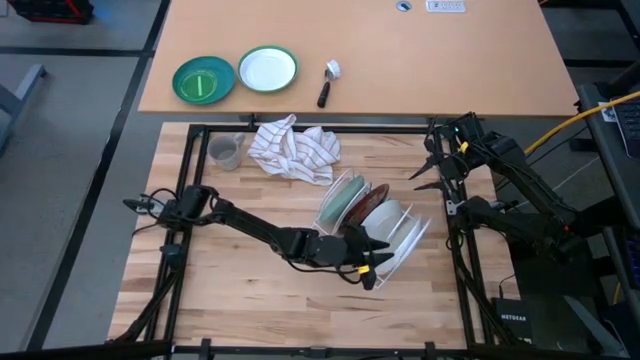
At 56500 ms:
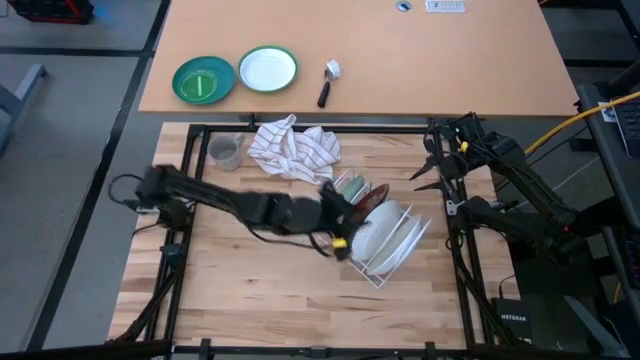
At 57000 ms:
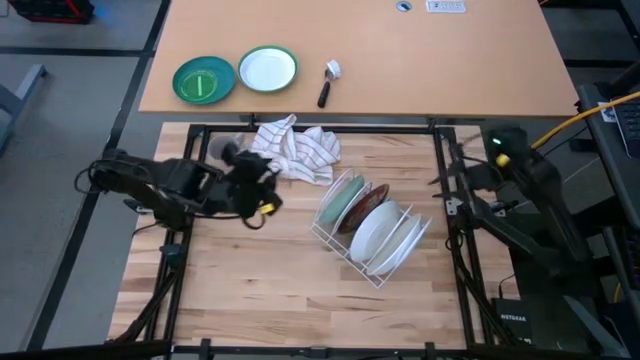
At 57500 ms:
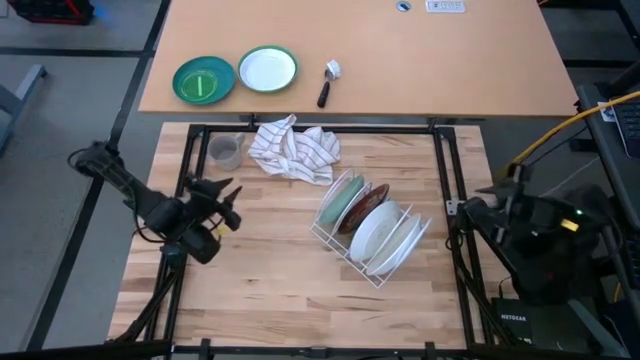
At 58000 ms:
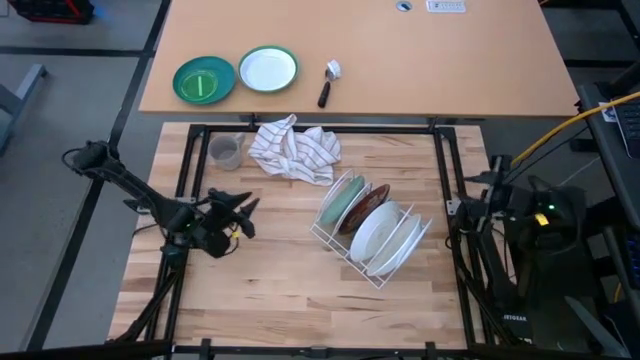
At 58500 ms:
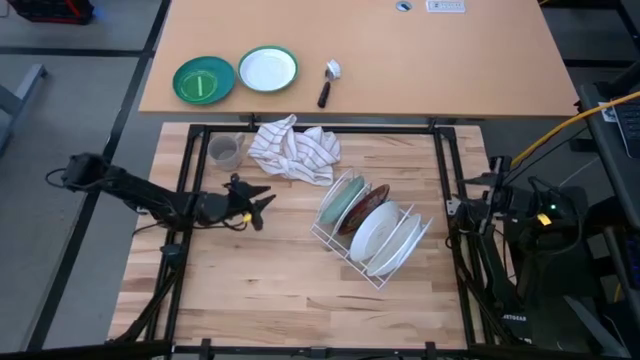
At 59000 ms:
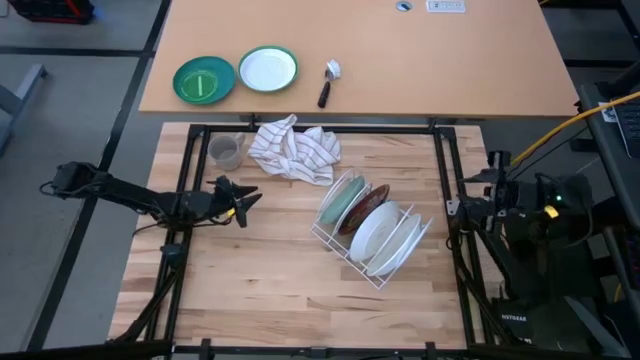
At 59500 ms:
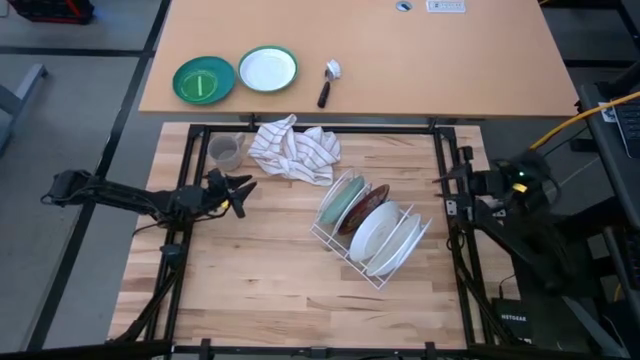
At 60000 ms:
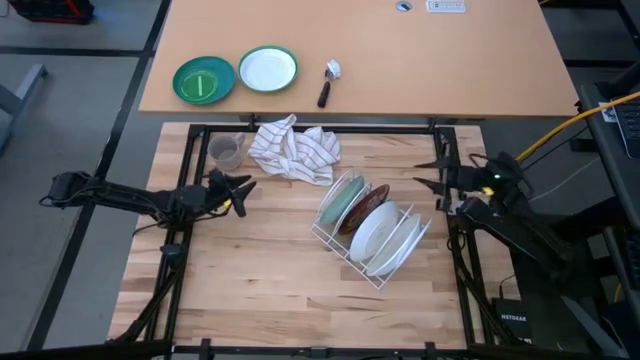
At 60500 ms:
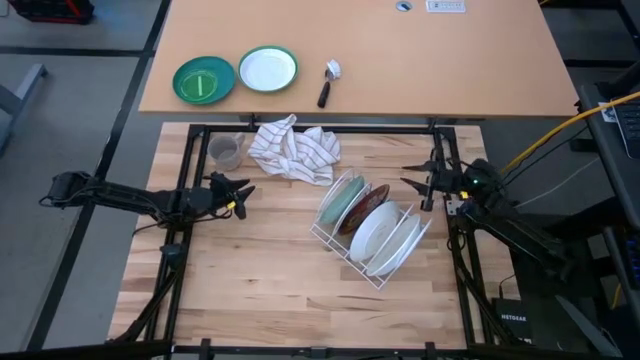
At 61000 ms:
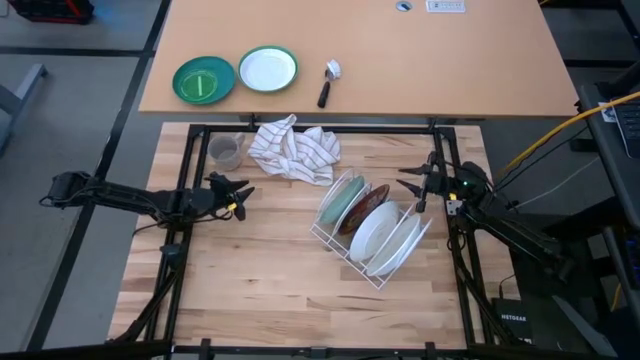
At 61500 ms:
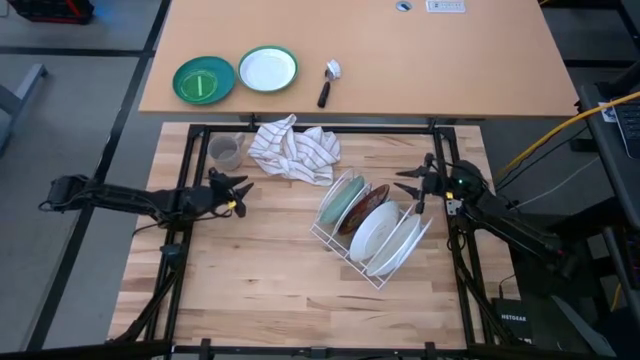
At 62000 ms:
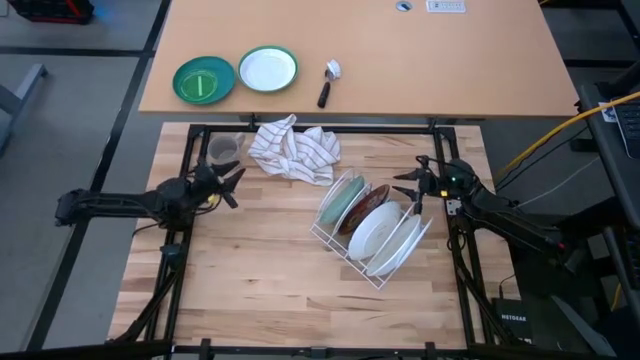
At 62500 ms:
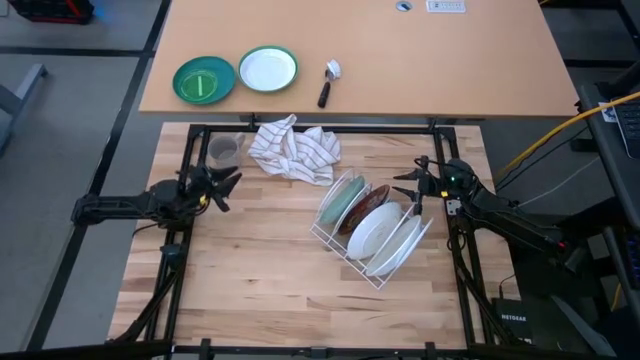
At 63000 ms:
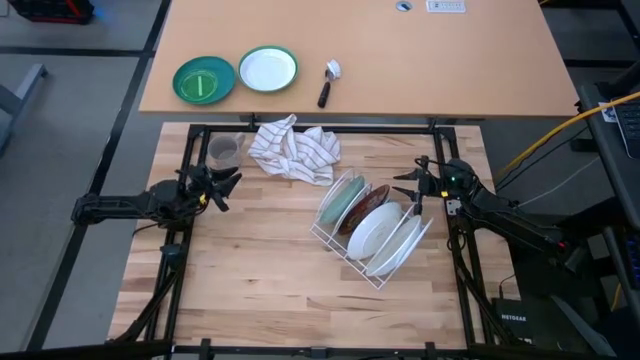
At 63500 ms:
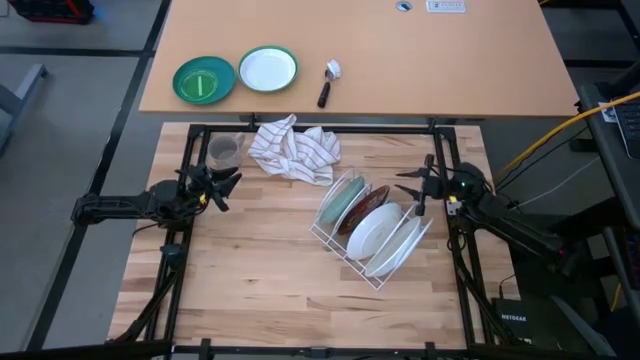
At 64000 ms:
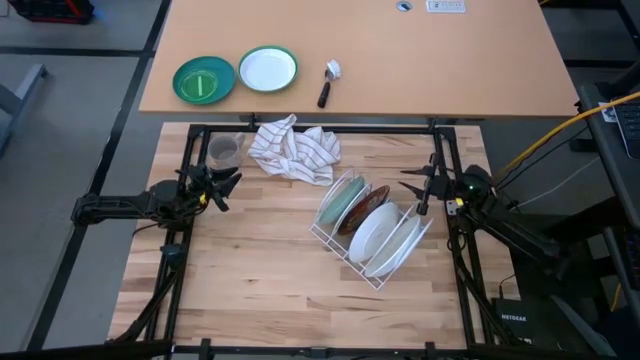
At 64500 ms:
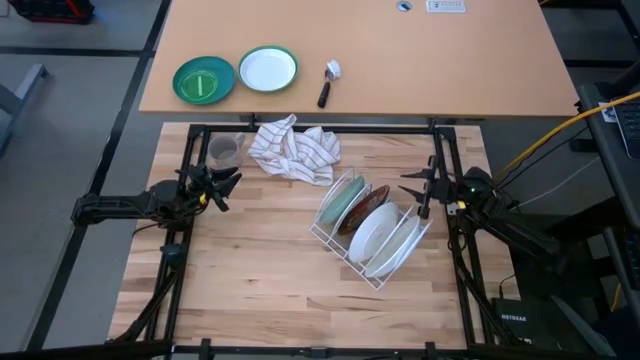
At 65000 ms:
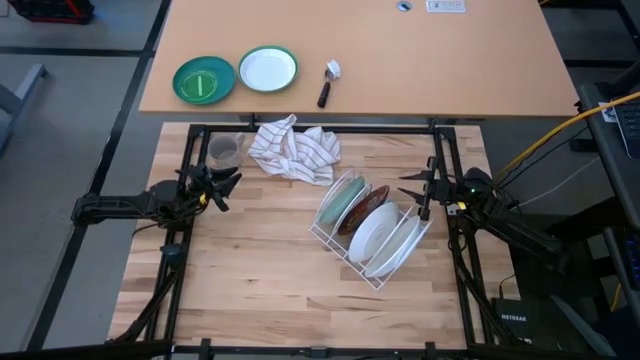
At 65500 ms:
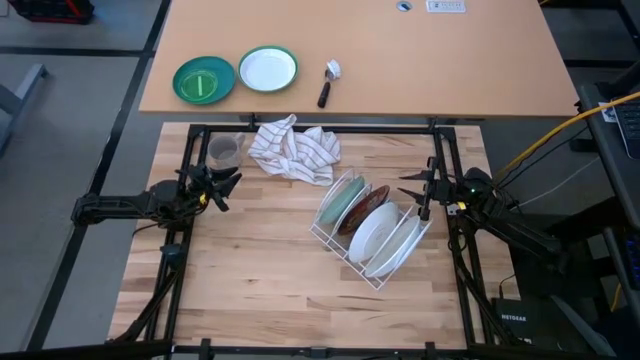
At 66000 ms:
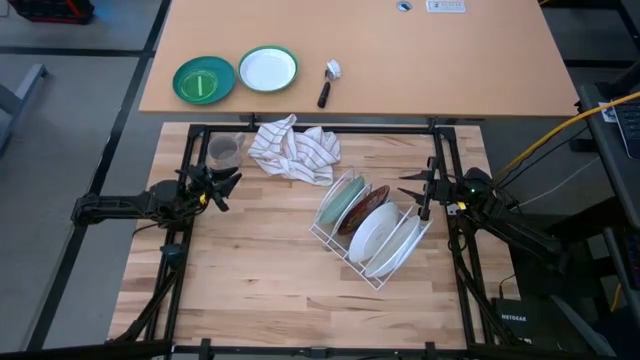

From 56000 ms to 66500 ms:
Task: Sort dishes
Return to Home Position

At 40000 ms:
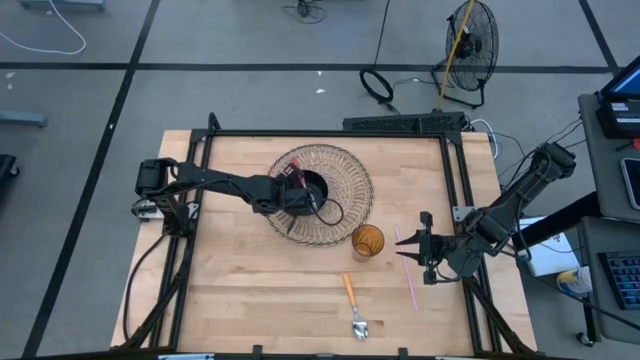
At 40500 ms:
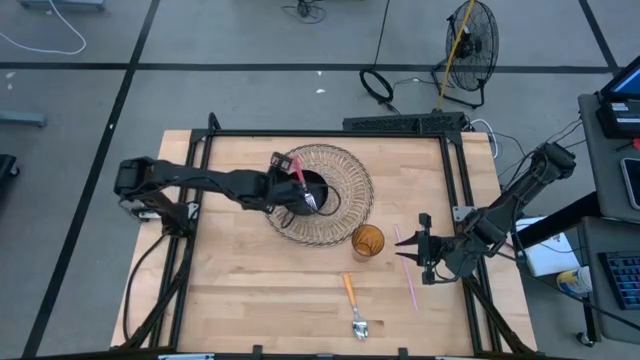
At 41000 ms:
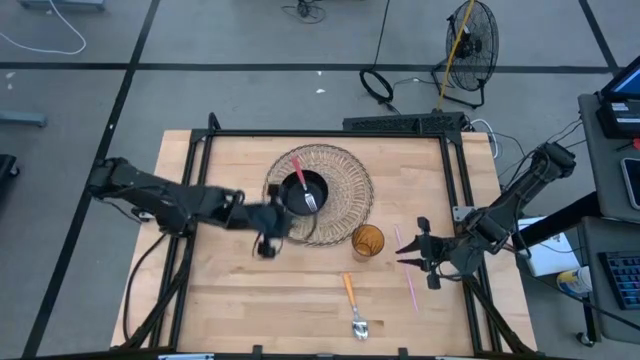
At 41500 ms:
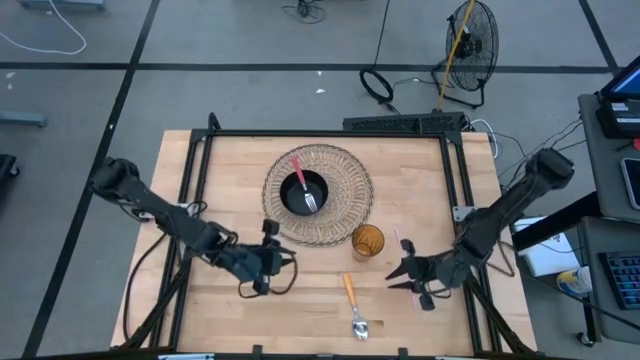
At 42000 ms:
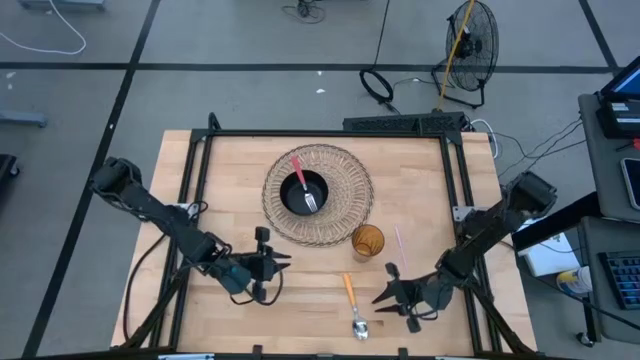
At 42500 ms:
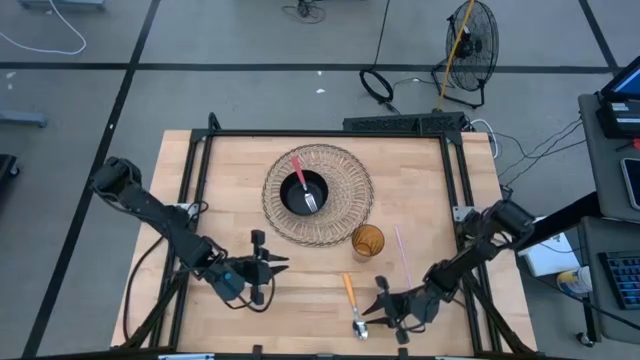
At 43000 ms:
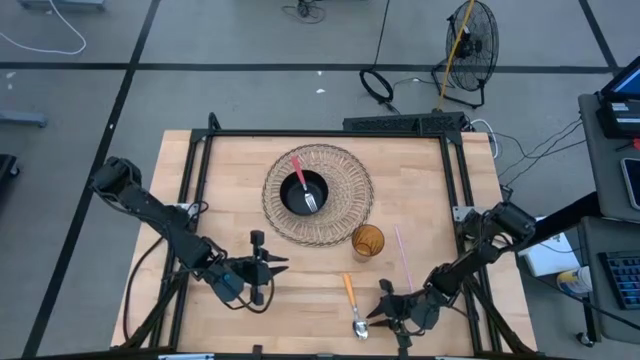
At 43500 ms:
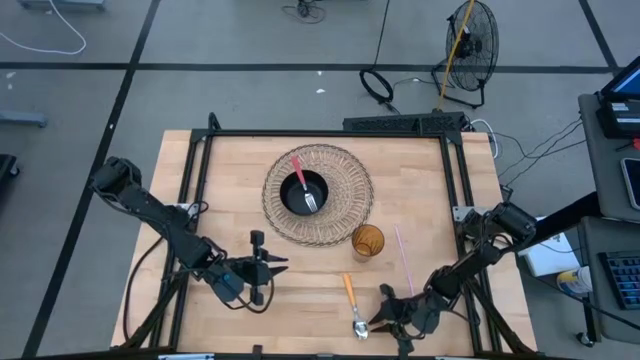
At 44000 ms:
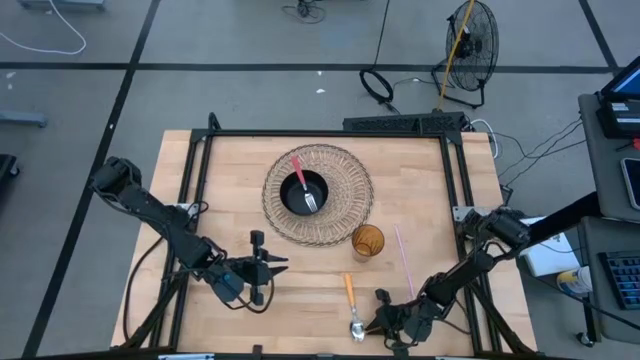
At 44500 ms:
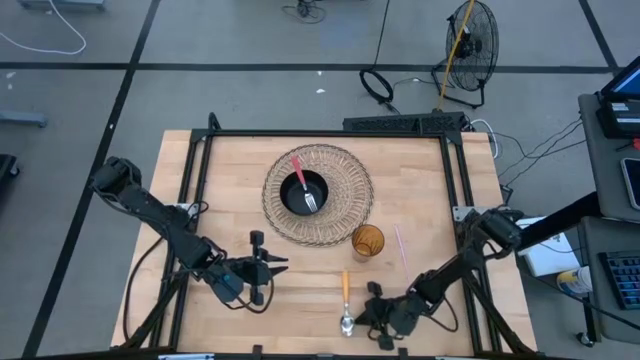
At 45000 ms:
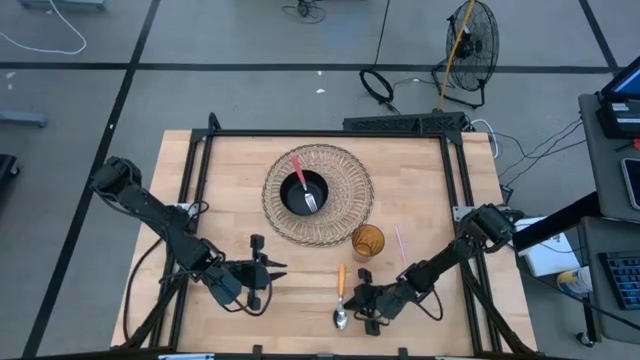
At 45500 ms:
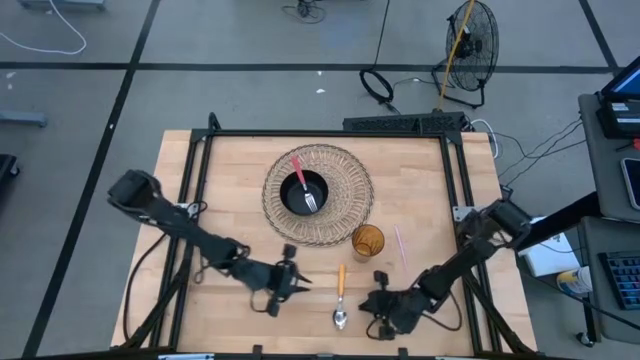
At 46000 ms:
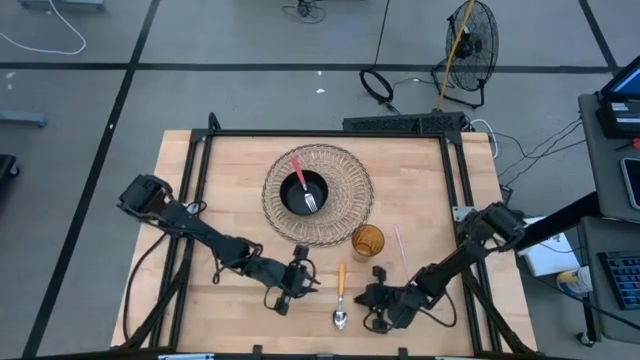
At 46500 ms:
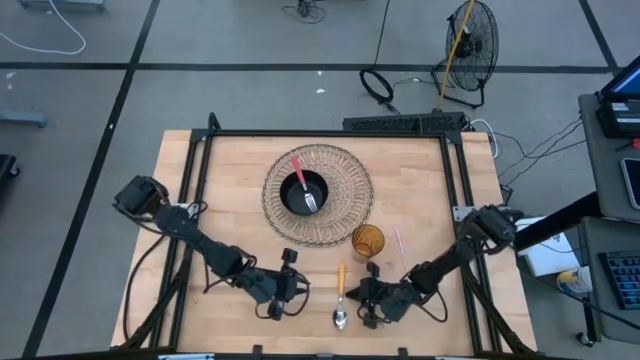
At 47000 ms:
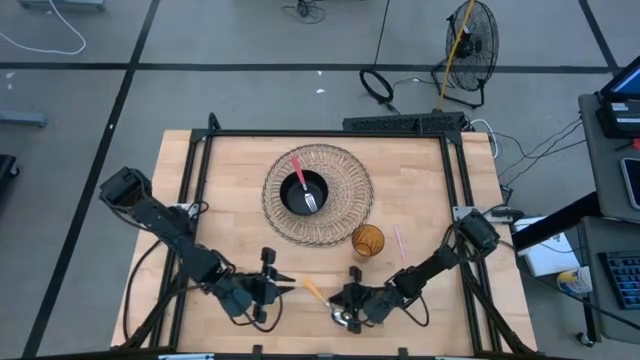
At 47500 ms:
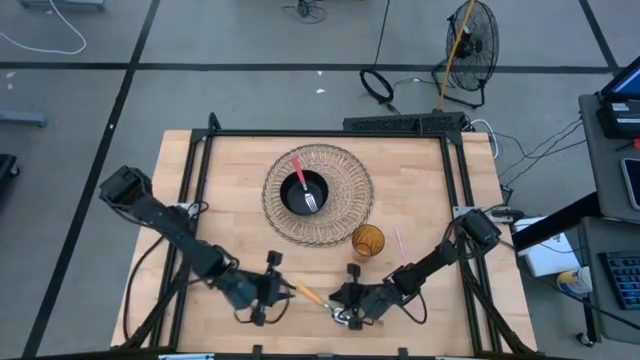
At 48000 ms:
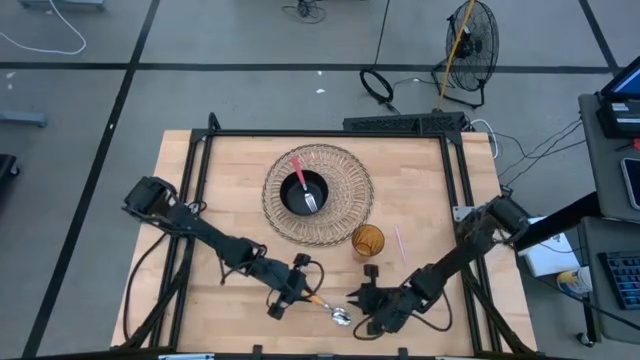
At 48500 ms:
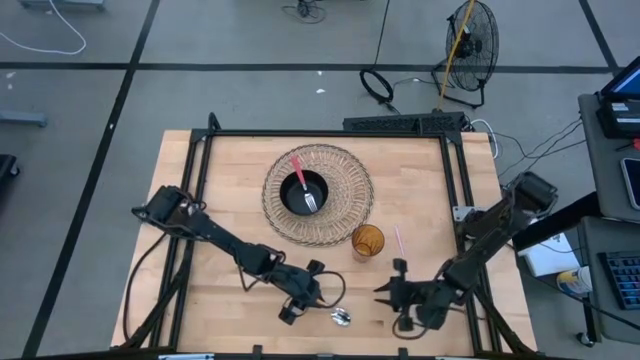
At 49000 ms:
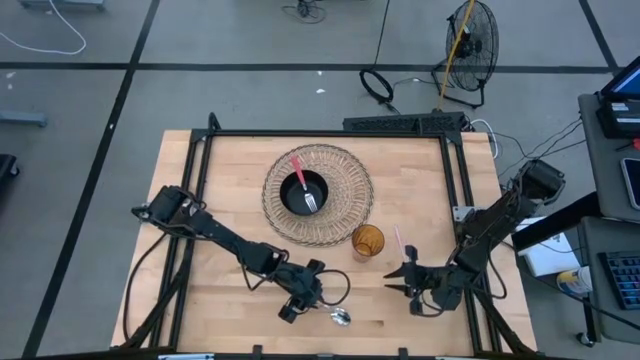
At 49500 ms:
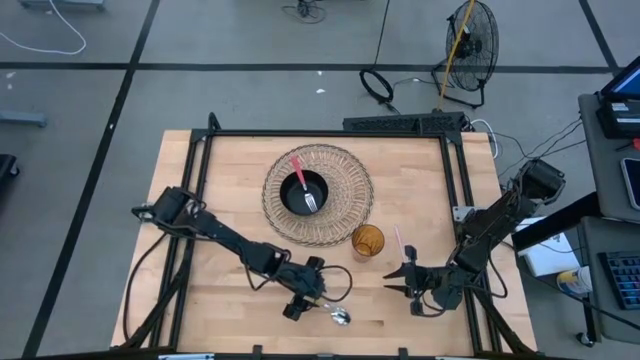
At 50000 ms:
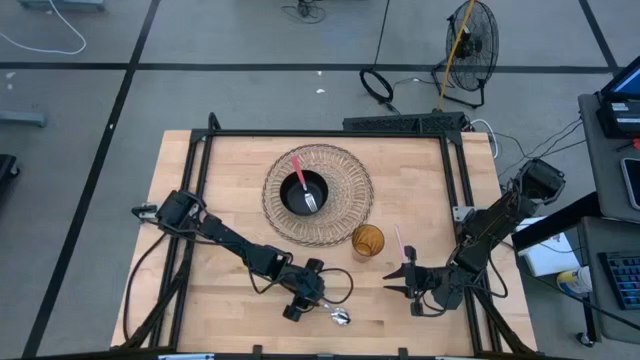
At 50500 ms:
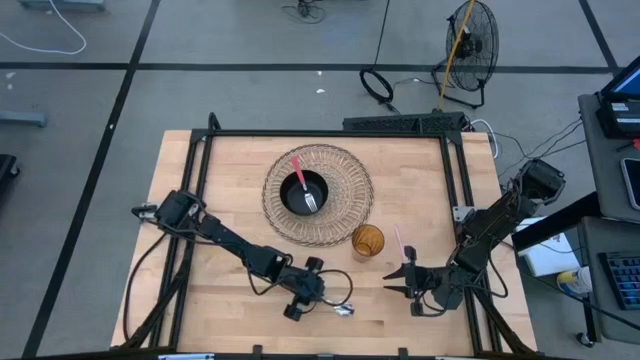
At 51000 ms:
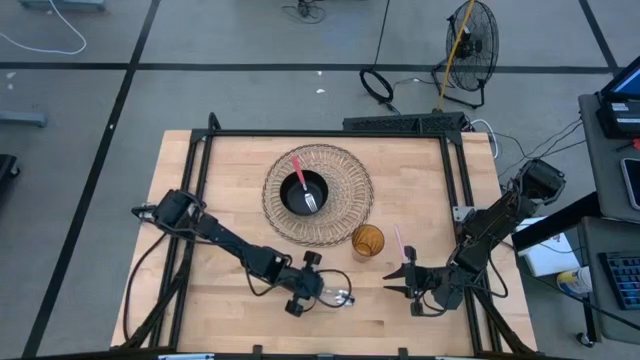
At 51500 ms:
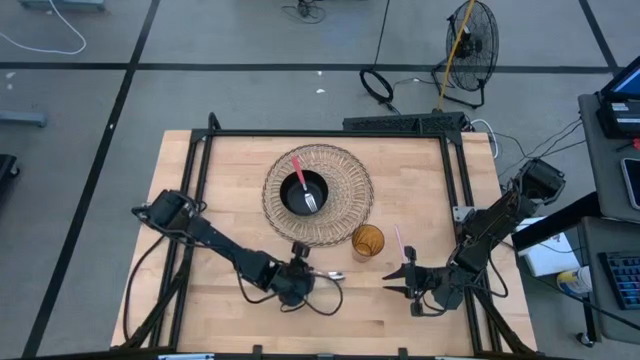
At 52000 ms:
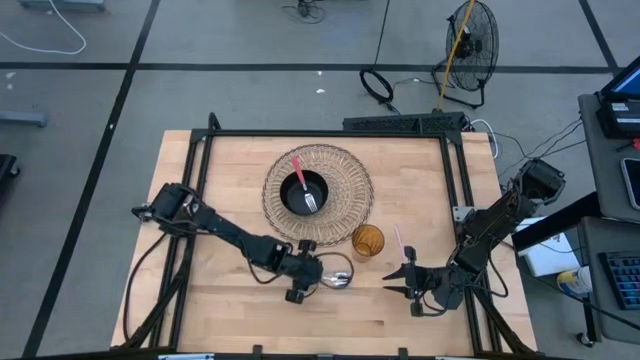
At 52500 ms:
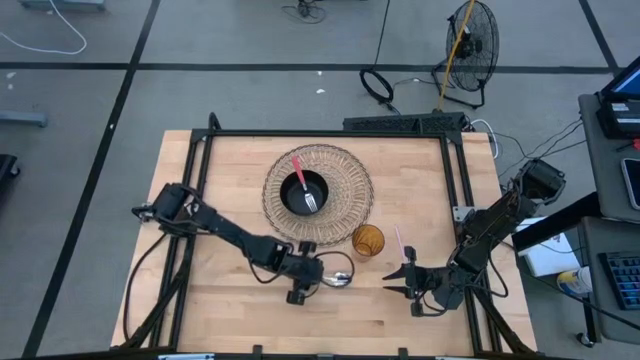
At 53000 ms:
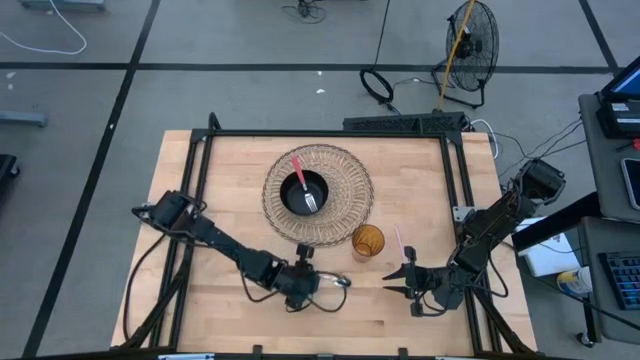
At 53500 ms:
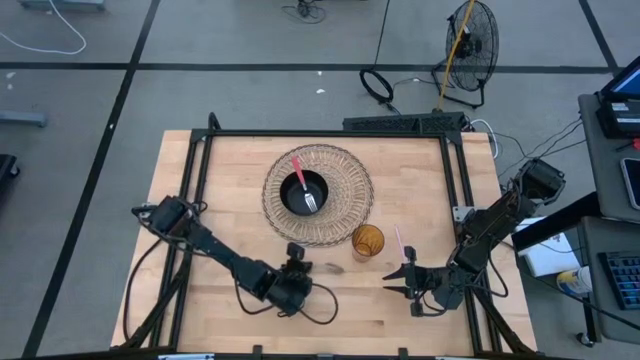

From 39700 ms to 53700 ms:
Task: Pick & Place Utensil
Put the yellow spoon into the black bowl on the woven mat
